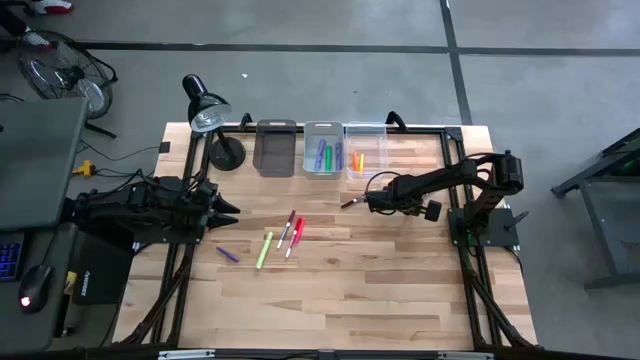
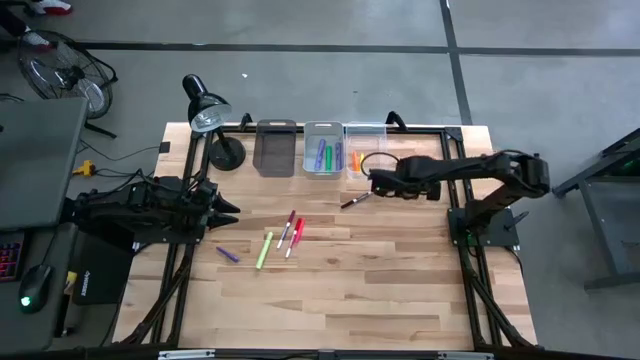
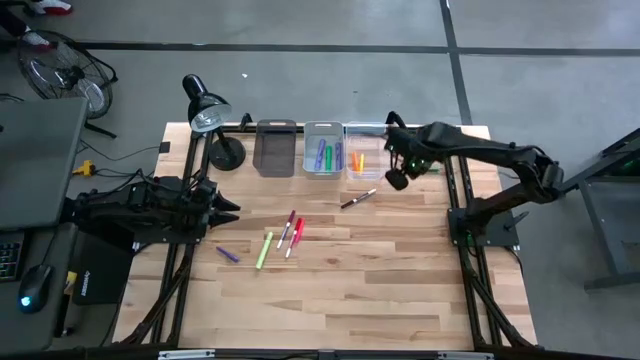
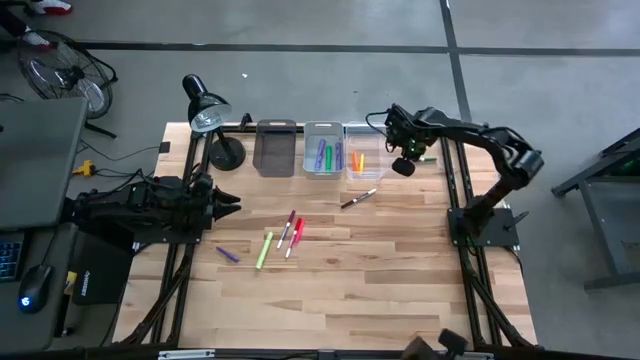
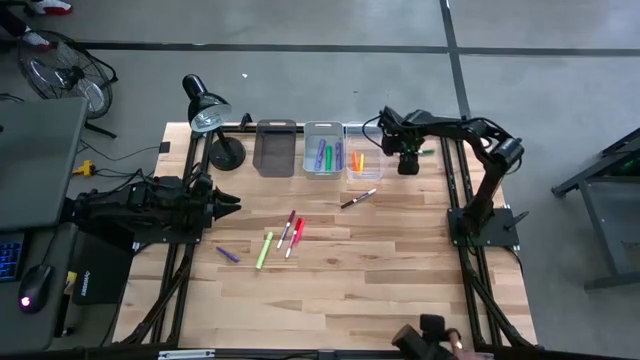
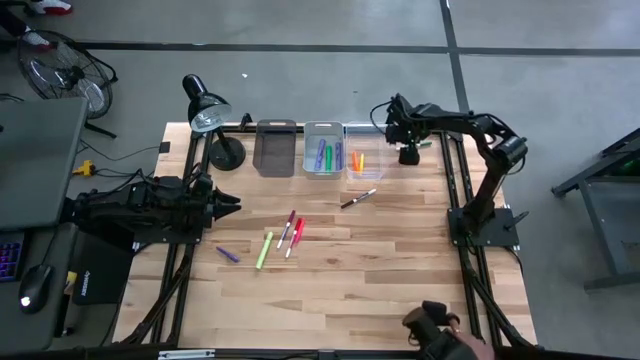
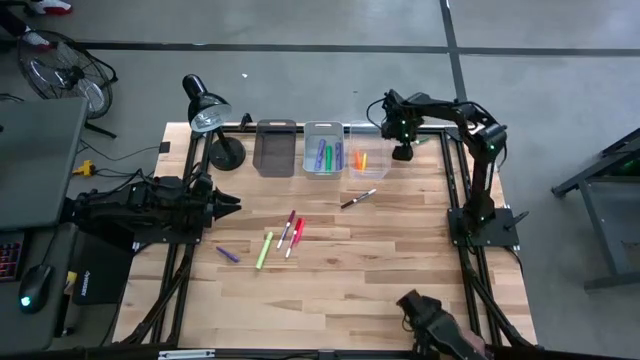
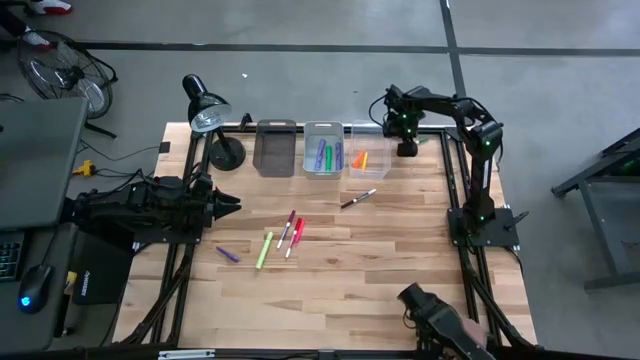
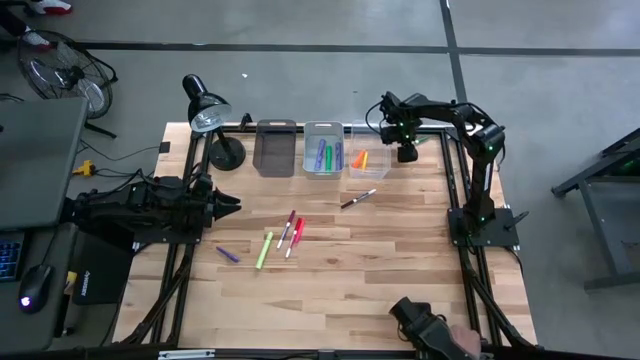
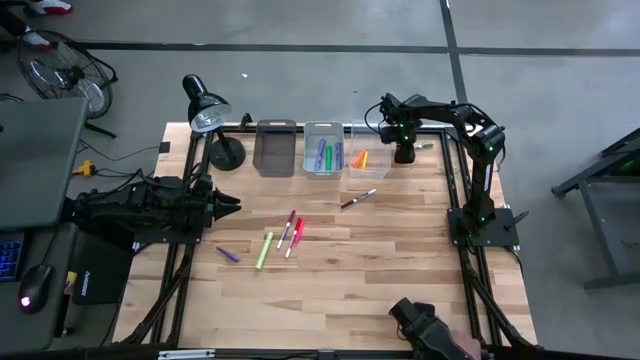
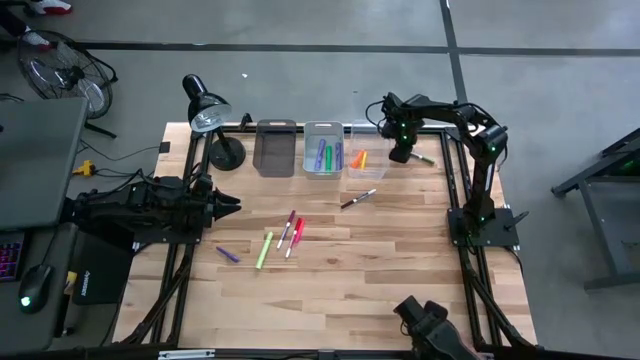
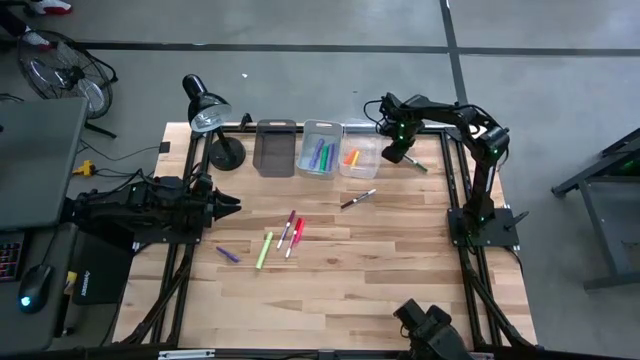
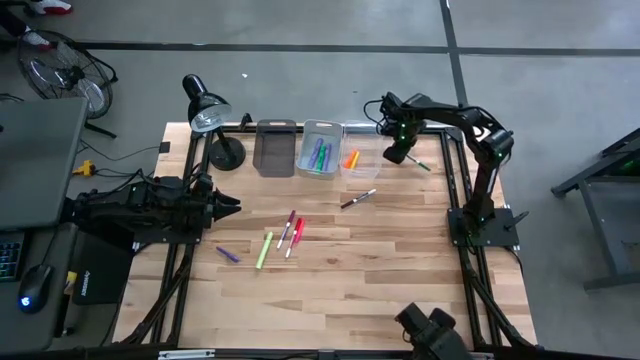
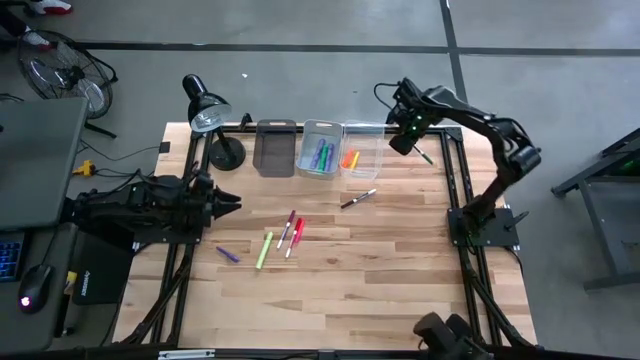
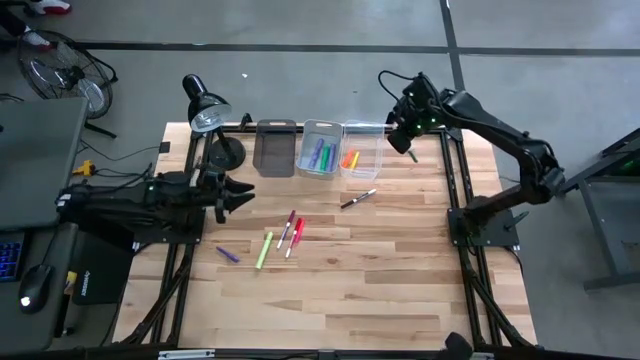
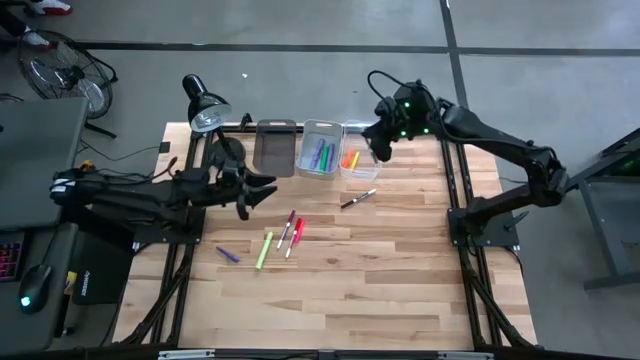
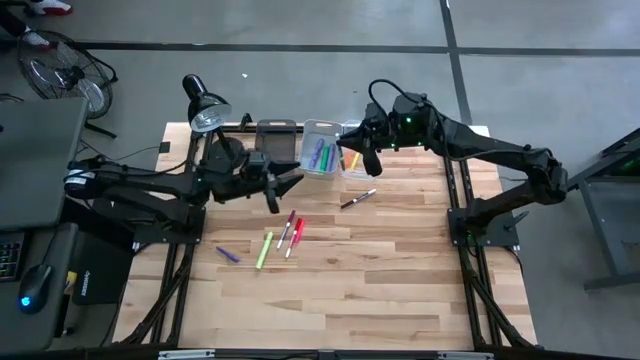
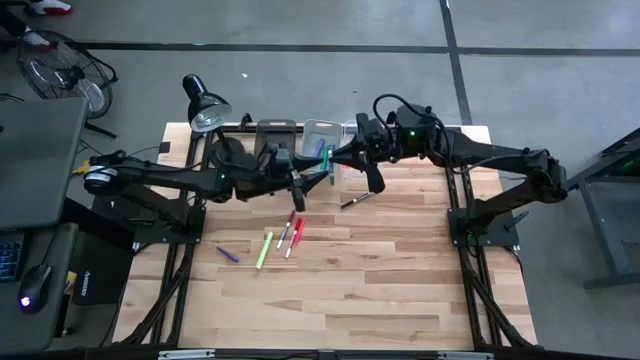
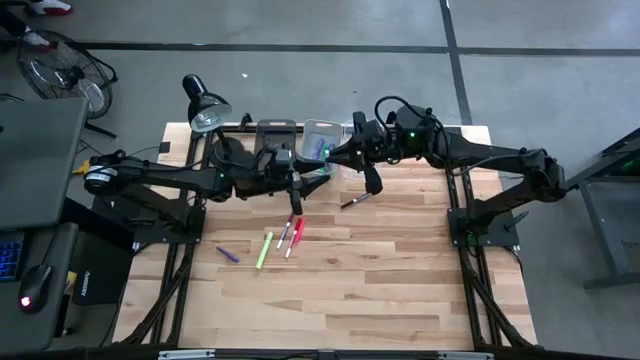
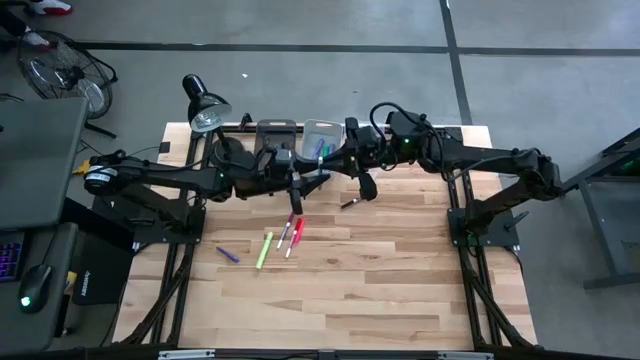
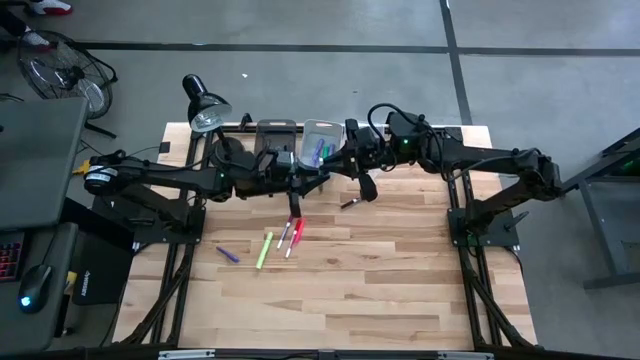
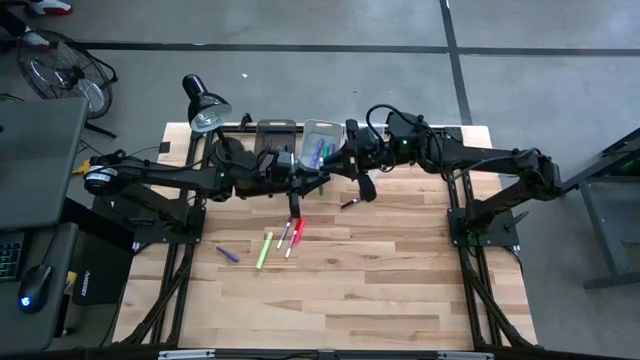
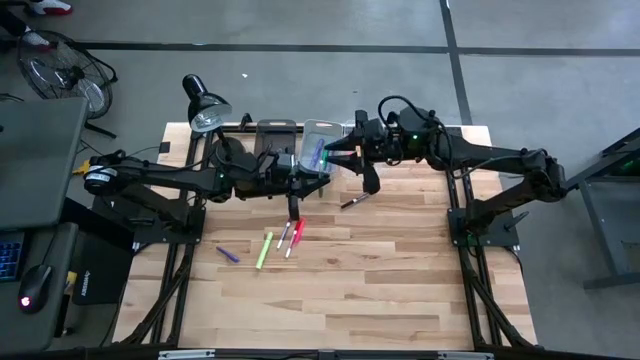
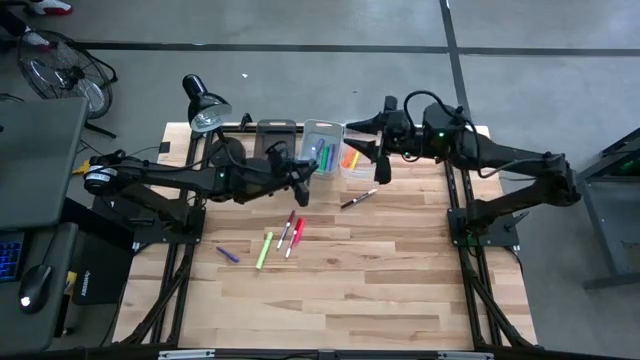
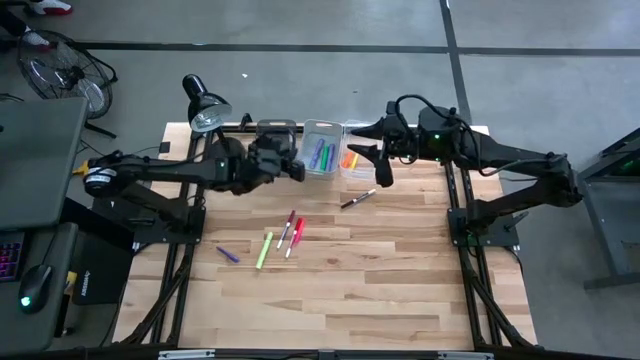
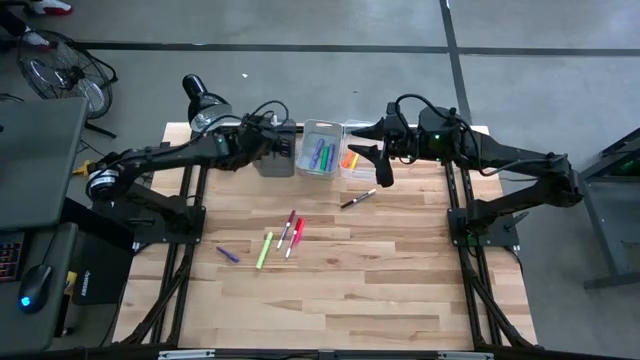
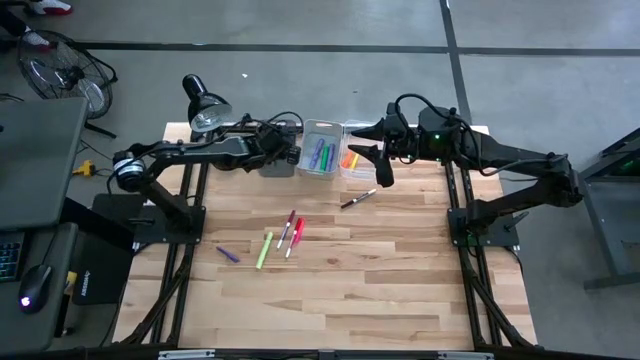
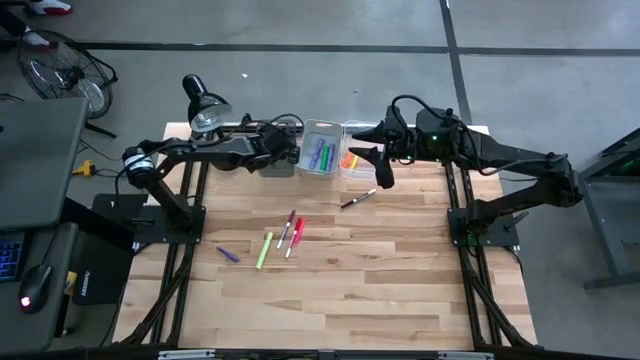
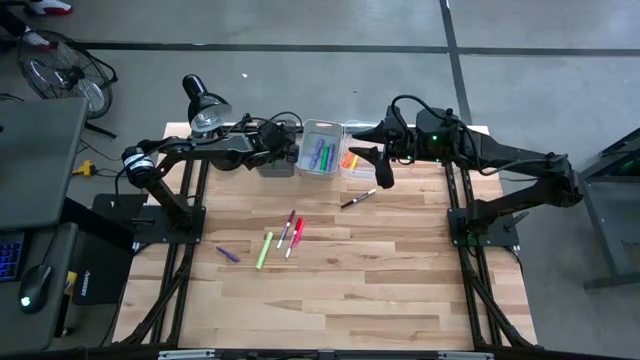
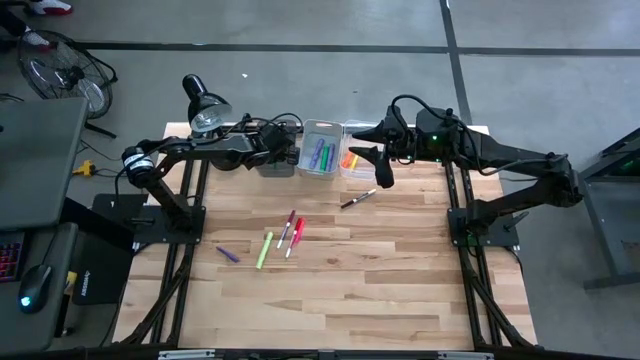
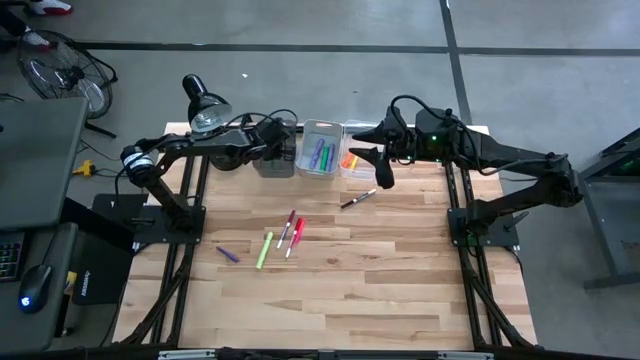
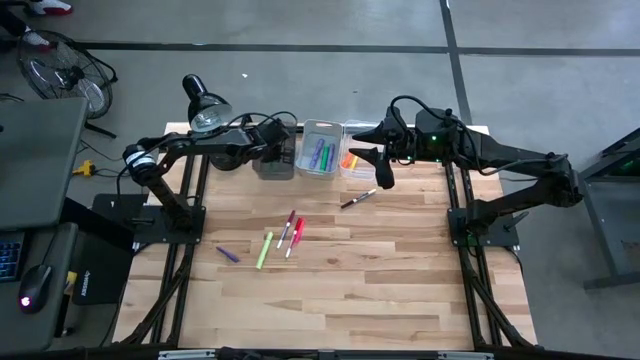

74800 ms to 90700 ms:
Task: Pick & Place Markers
Put the green marker into the black bin

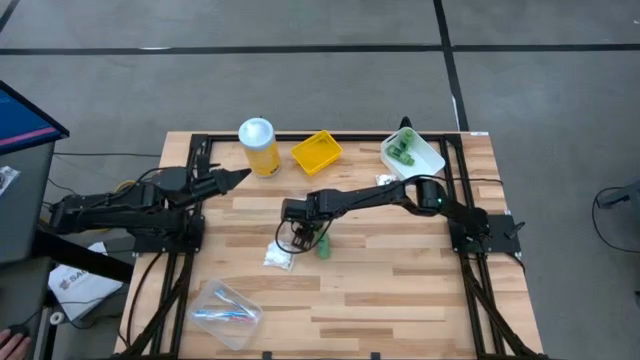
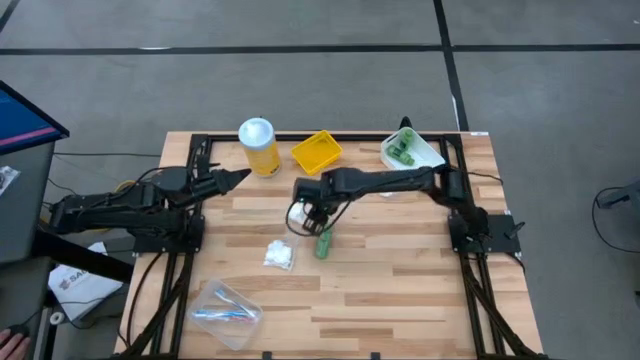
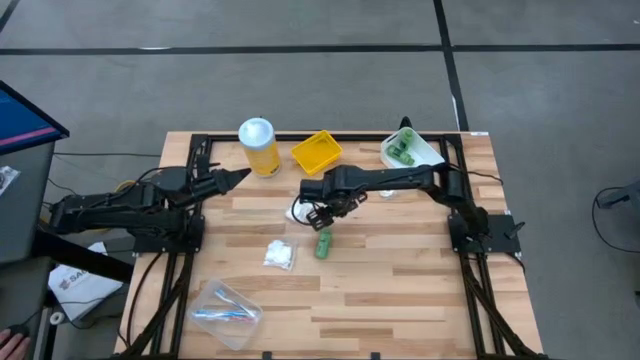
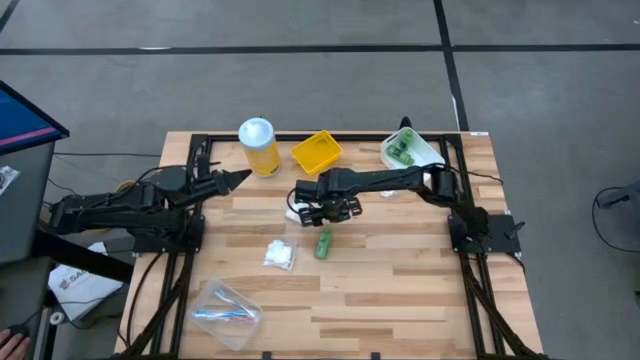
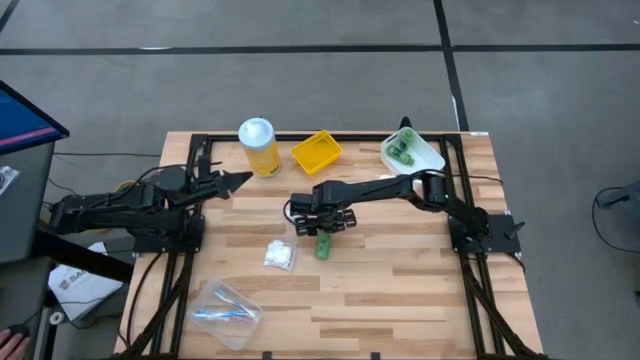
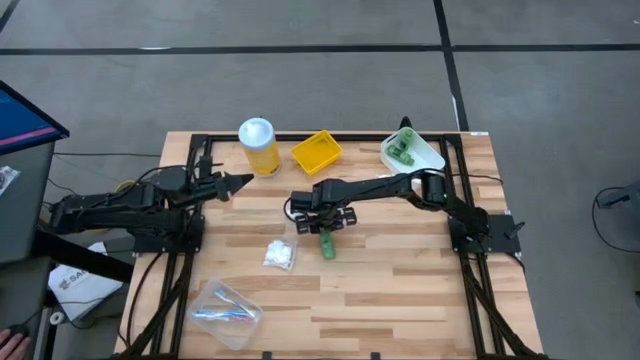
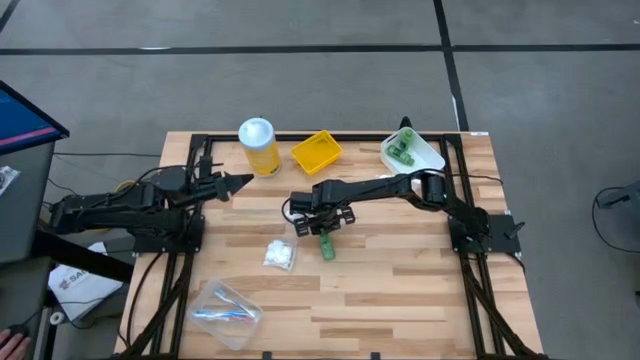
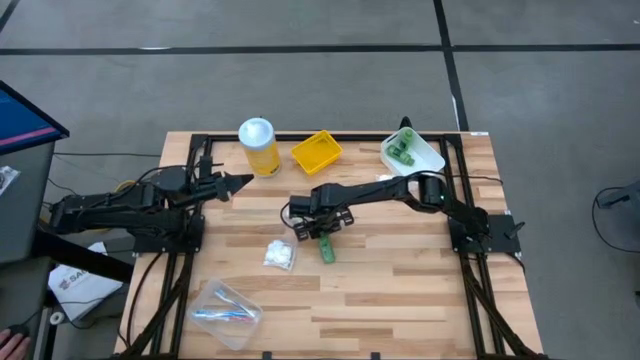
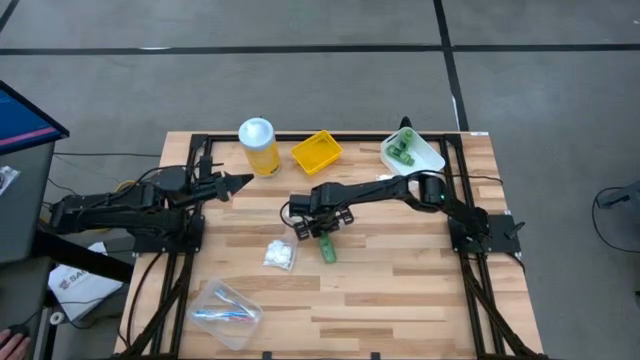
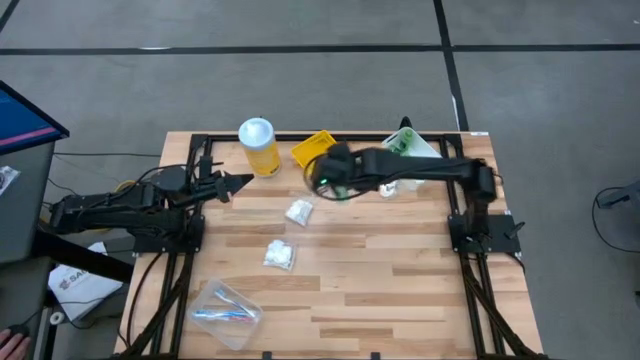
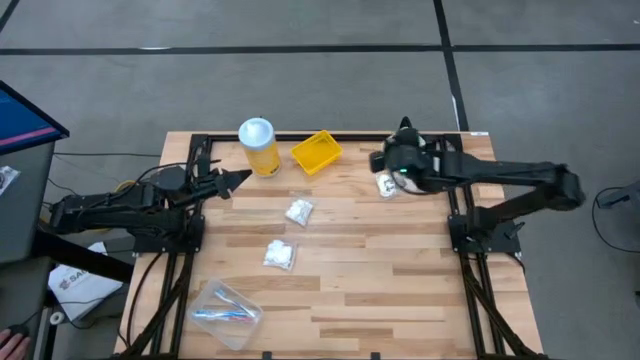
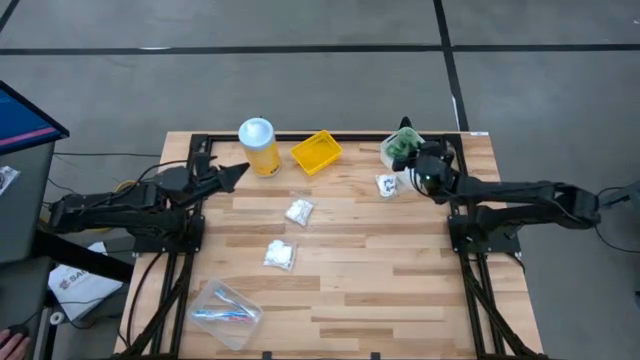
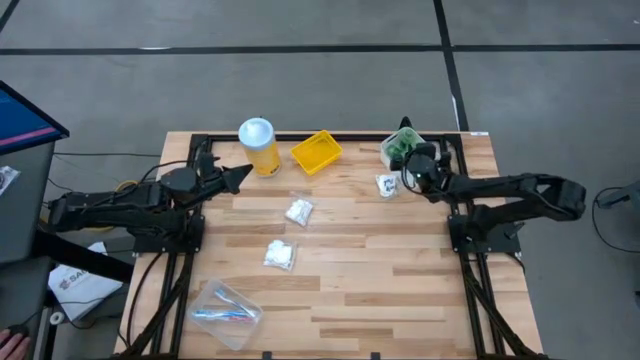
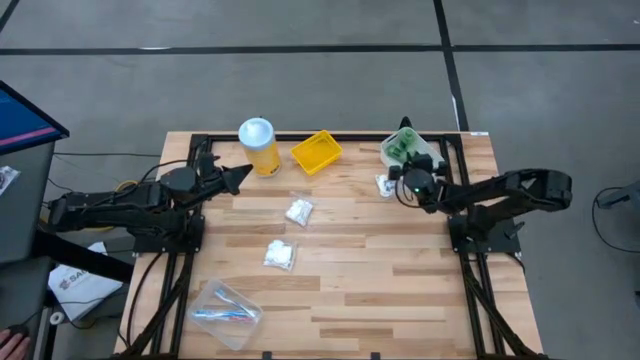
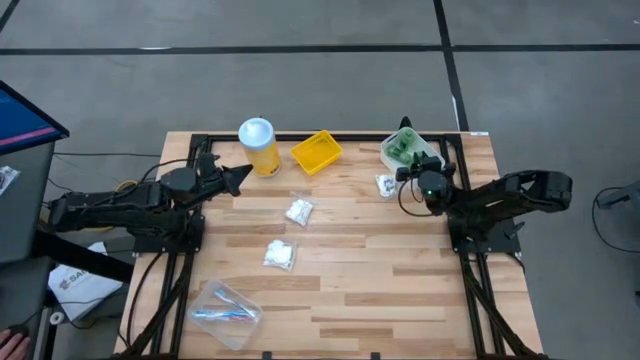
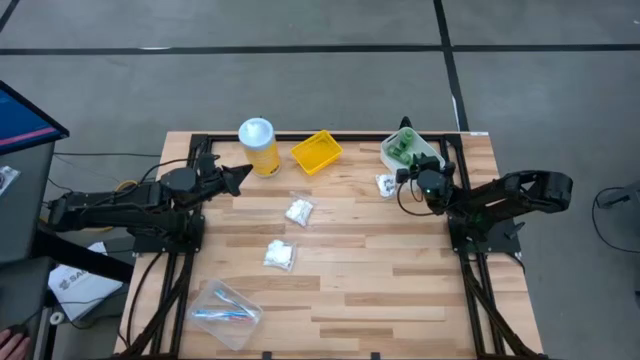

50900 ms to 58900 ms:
Task: Pick & Place Travel size toiletries
Put the green shampoo bottle into the white bin
